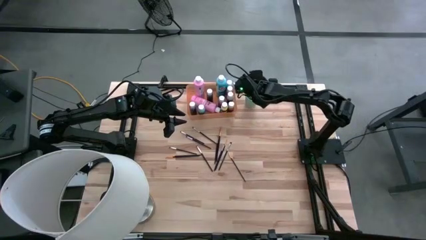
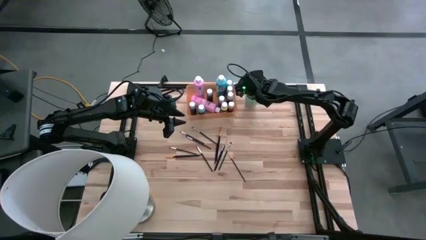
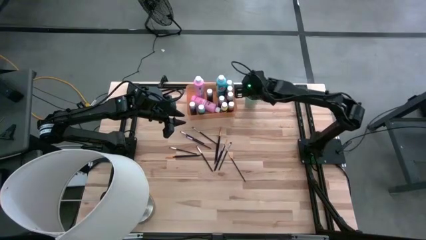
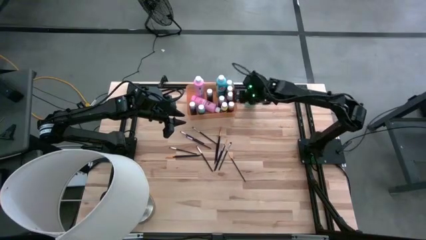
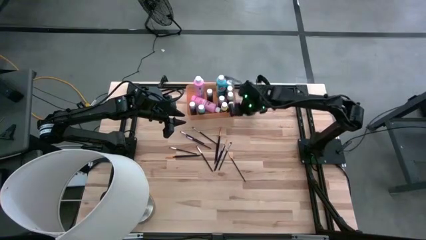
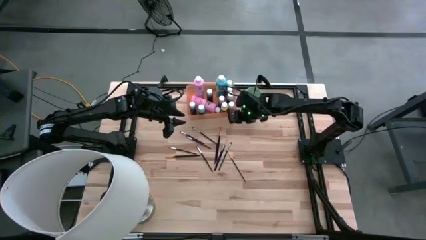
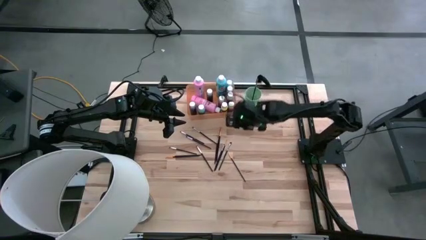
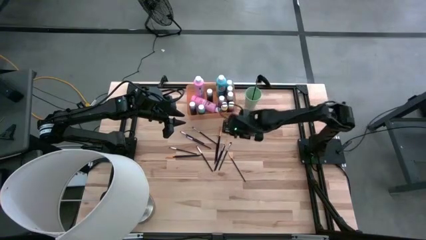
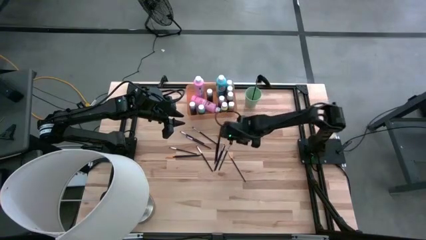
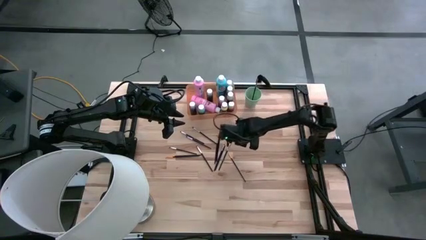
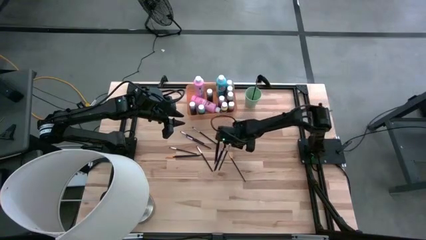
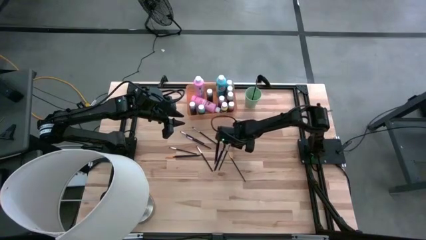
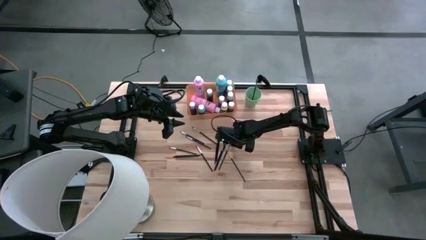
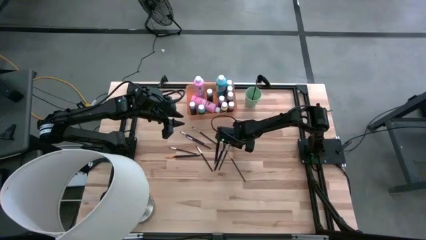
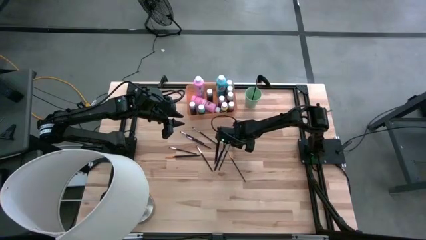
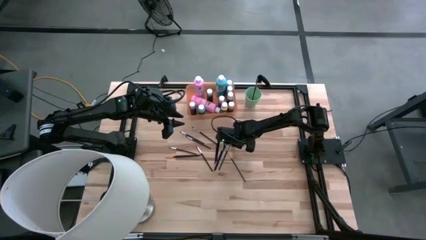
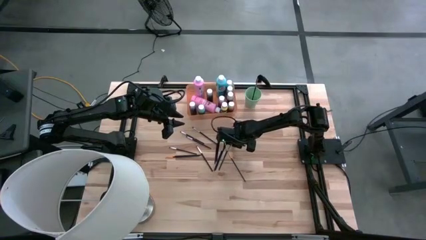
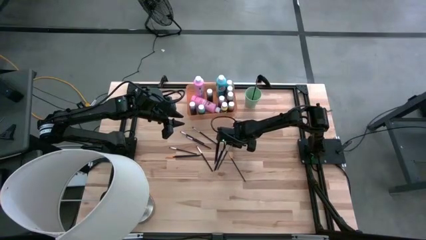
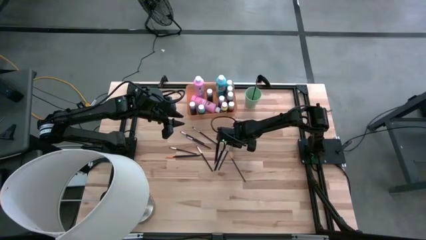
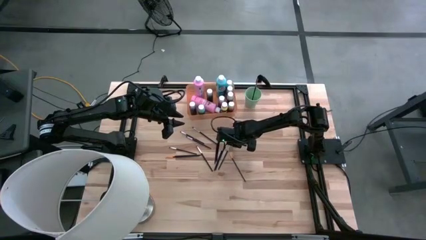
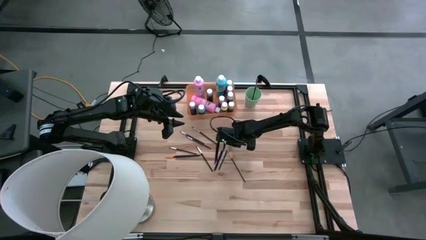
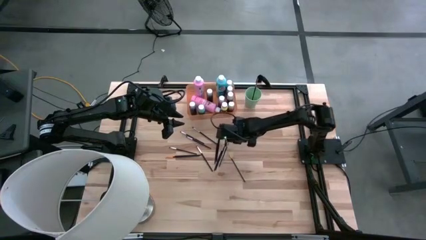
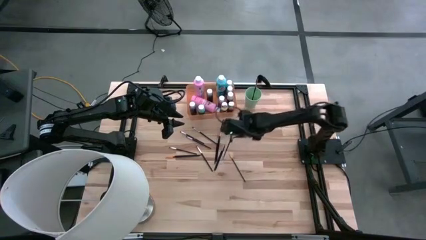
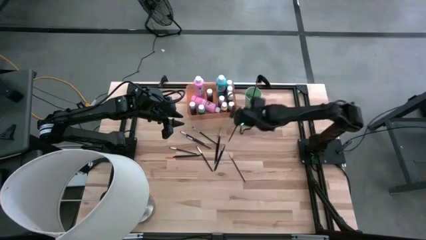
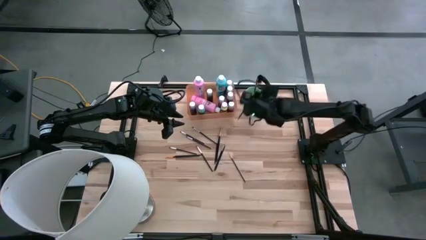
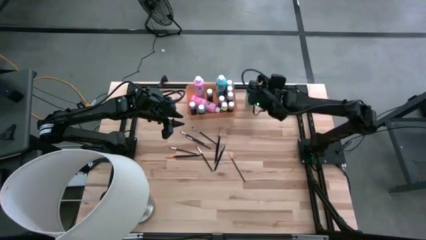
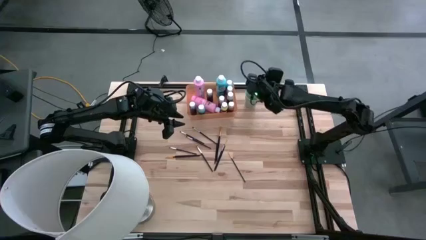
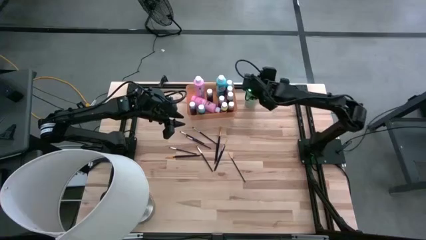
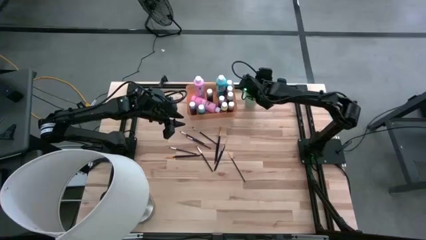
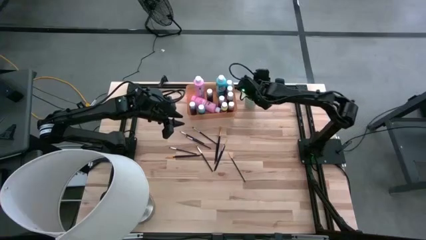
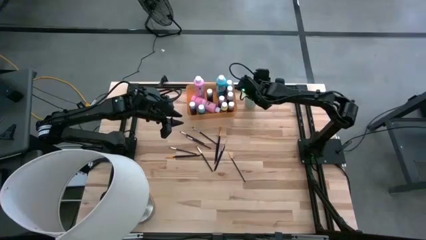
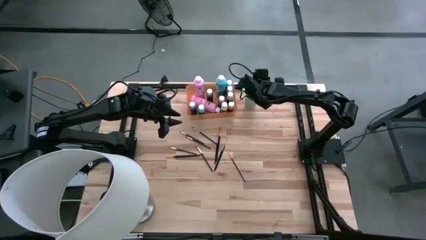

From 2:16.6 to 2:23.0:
Task: Pick & Place Paint Supplies
Put the silver paint brush into the green cup

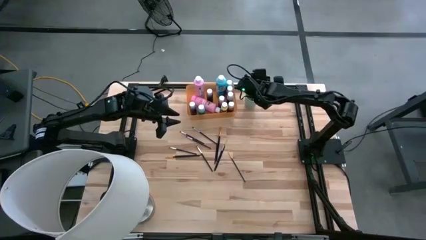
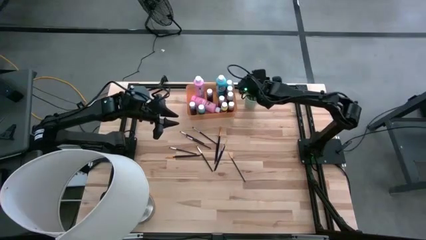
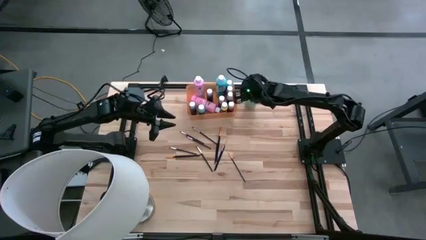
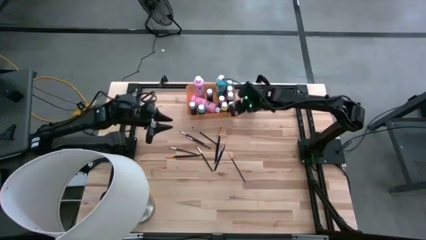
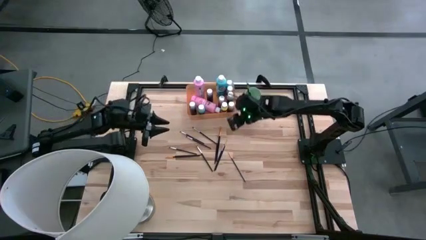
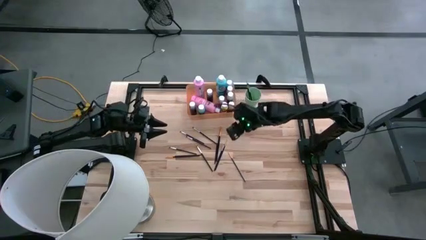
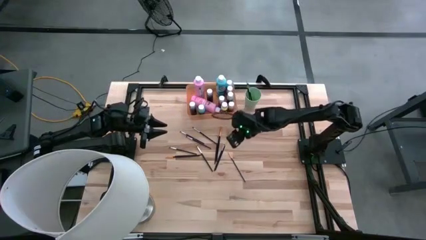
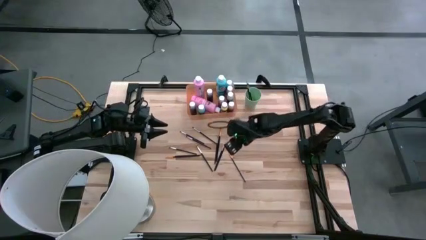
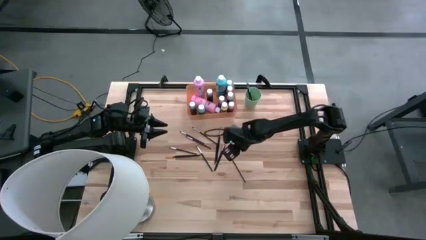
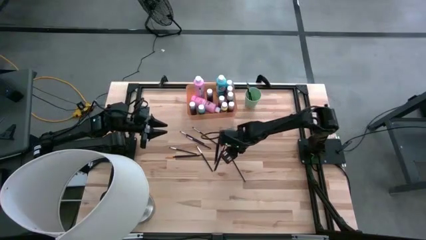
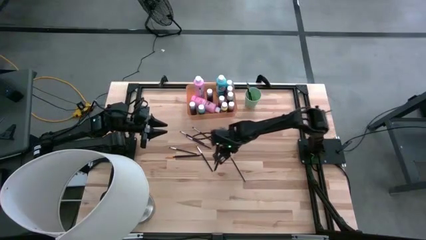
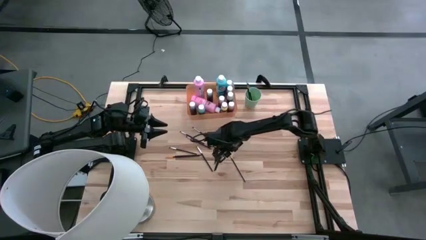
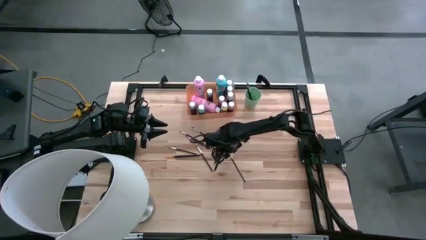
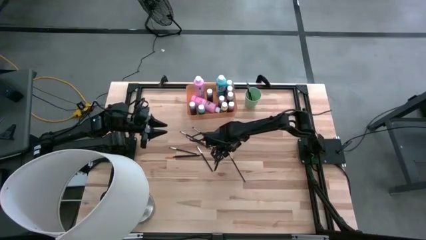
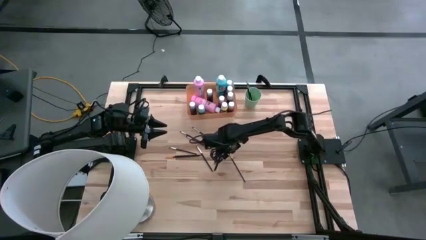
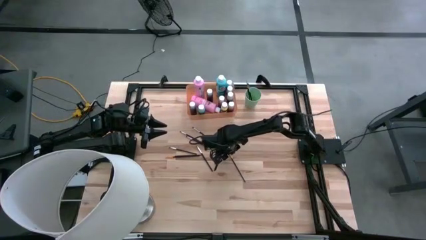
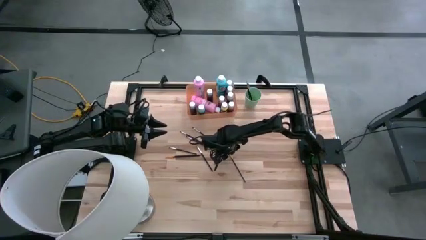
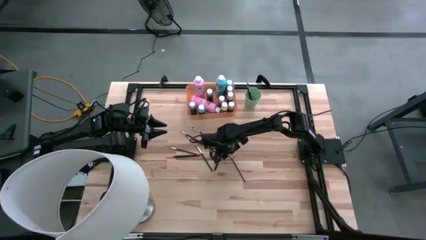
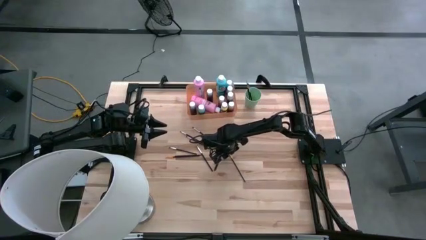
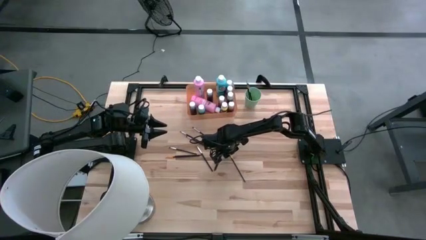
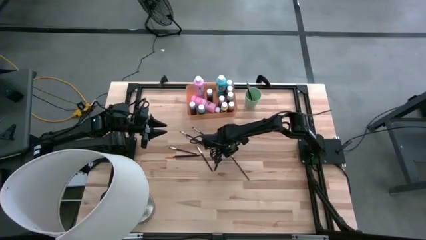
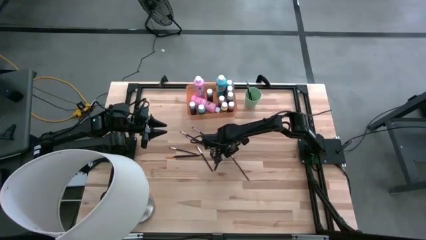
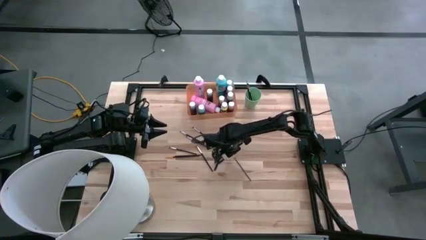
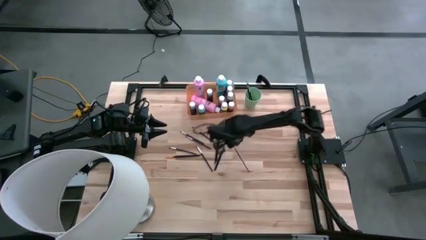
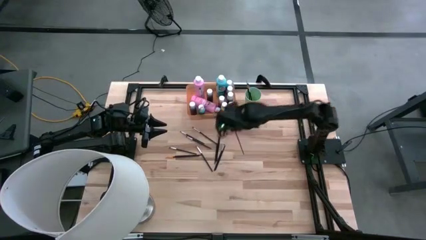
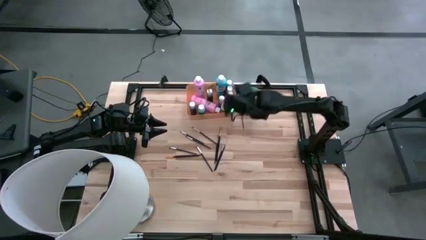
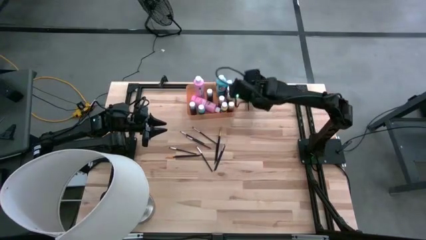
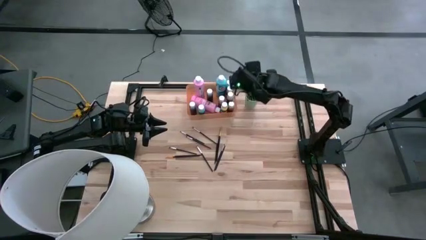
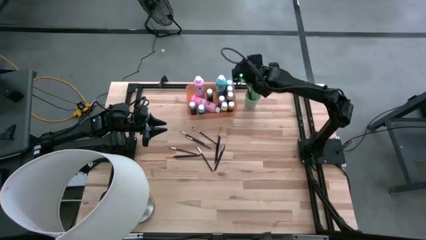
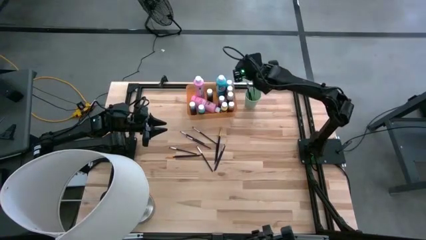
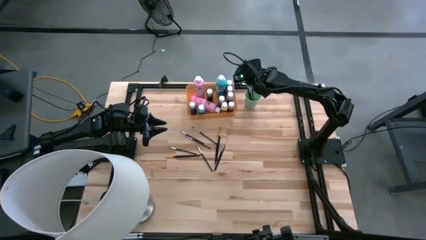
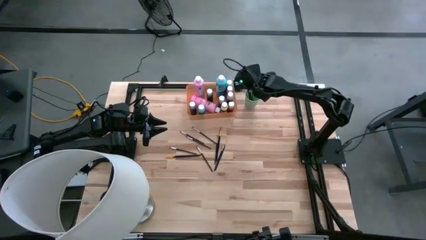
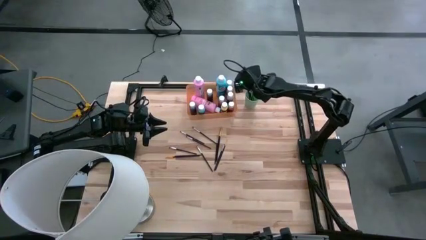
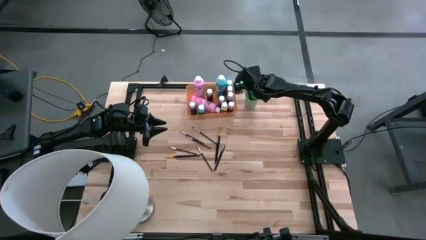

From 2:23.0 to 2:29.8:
Put the gold paint brush into the green cup
